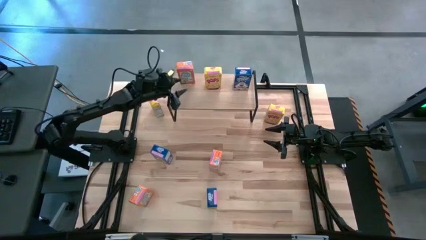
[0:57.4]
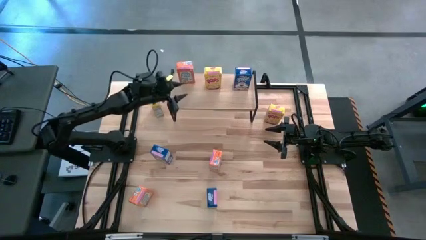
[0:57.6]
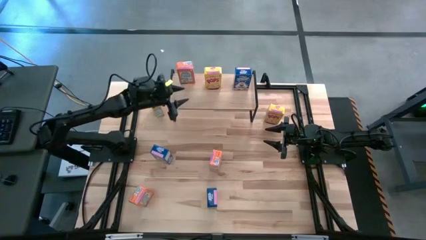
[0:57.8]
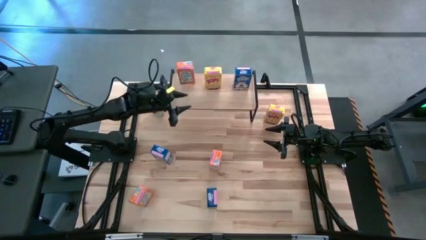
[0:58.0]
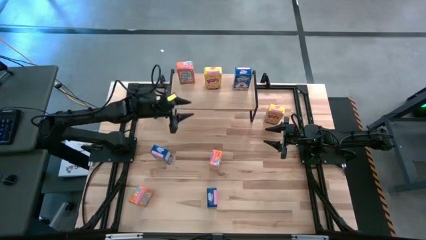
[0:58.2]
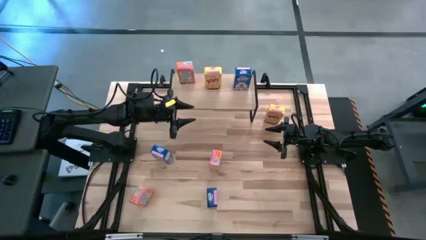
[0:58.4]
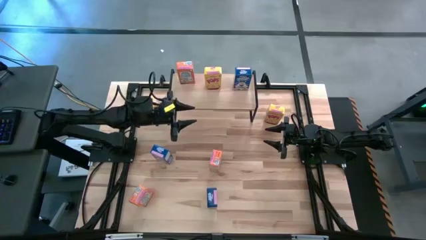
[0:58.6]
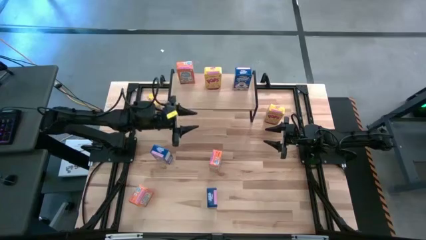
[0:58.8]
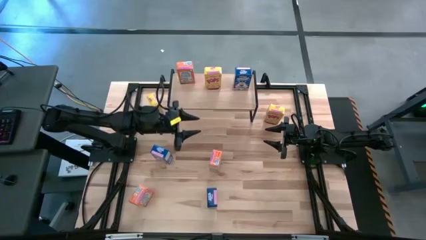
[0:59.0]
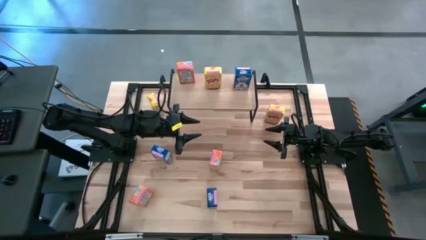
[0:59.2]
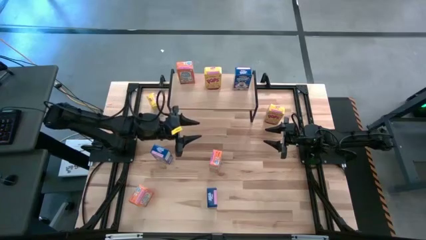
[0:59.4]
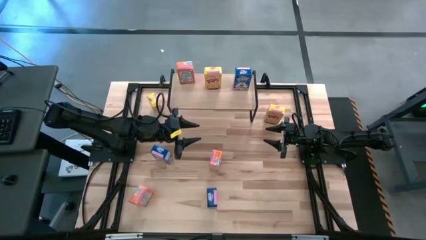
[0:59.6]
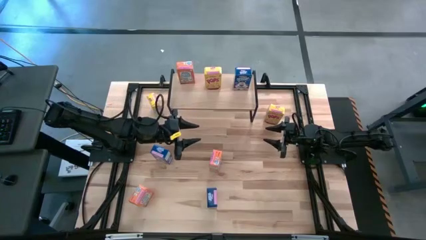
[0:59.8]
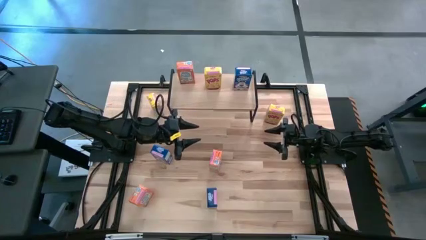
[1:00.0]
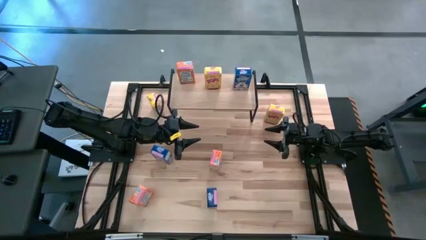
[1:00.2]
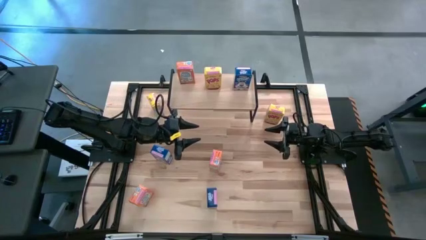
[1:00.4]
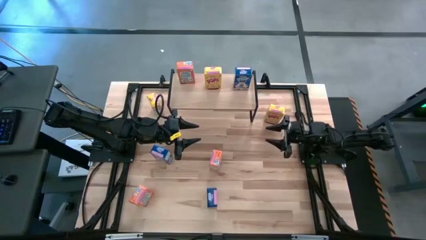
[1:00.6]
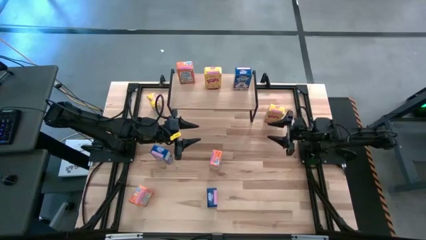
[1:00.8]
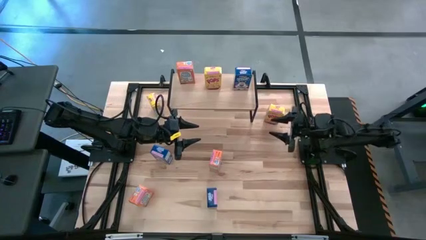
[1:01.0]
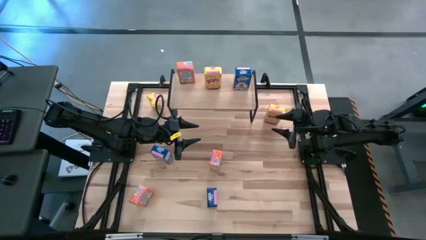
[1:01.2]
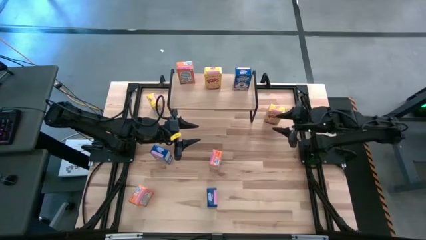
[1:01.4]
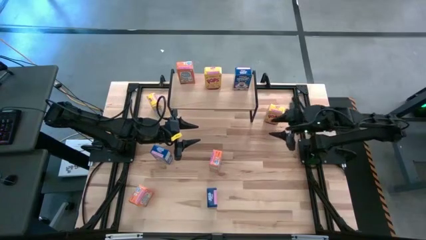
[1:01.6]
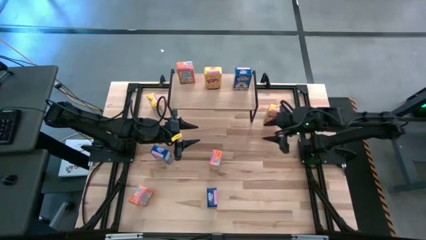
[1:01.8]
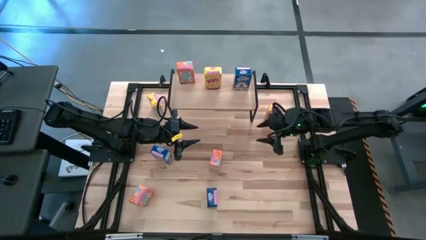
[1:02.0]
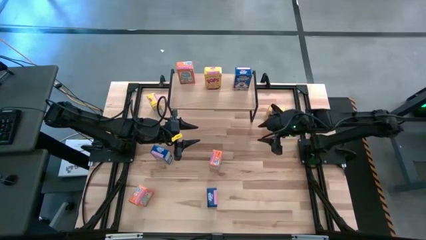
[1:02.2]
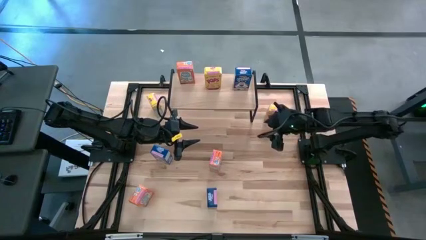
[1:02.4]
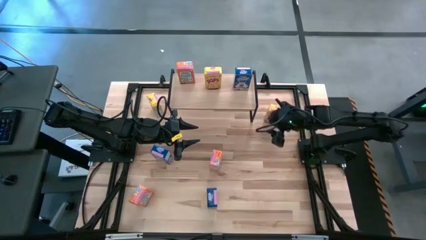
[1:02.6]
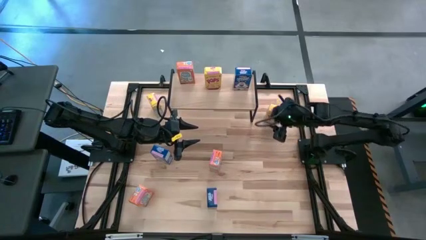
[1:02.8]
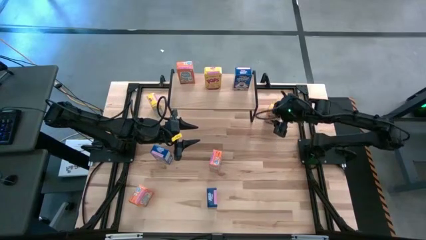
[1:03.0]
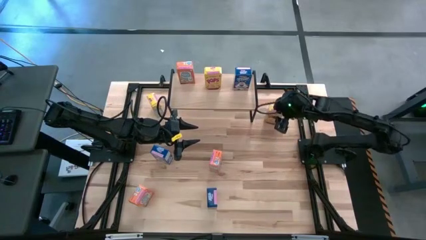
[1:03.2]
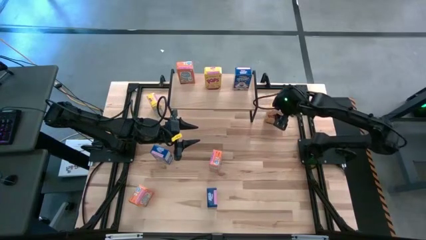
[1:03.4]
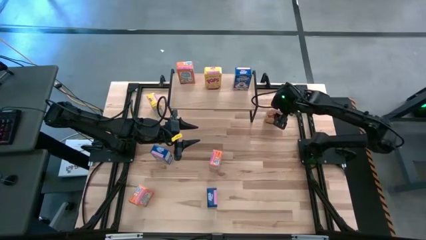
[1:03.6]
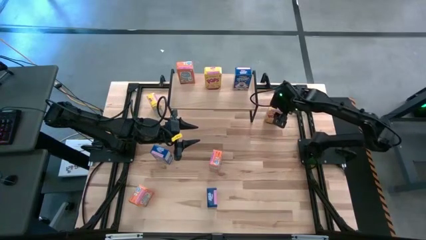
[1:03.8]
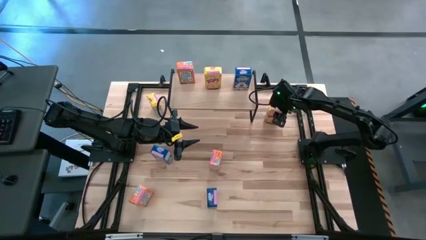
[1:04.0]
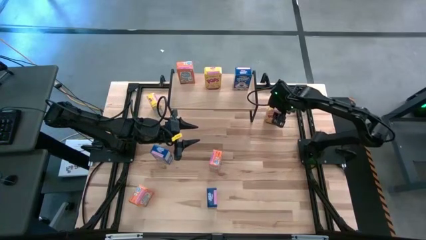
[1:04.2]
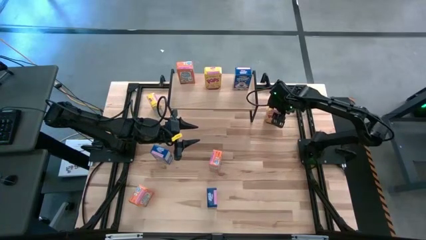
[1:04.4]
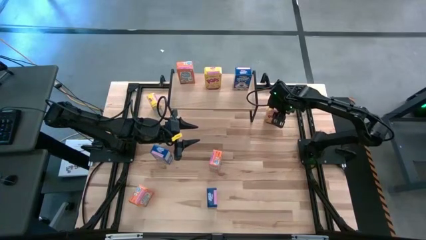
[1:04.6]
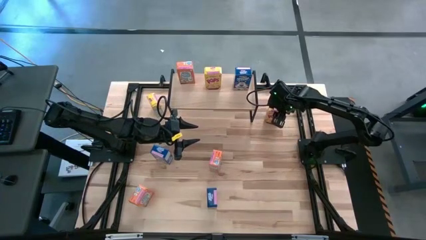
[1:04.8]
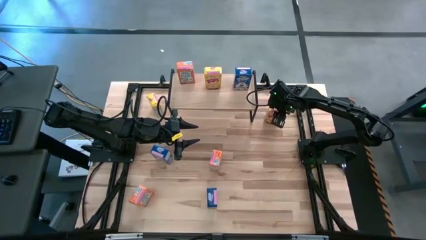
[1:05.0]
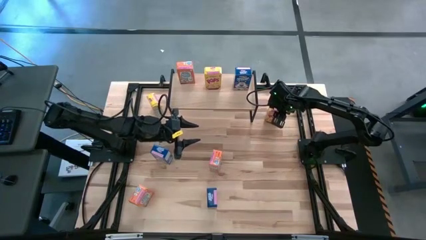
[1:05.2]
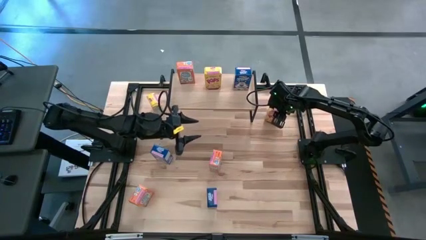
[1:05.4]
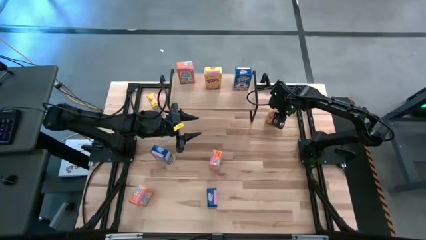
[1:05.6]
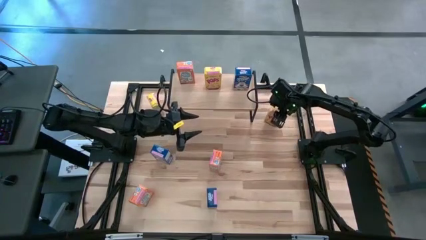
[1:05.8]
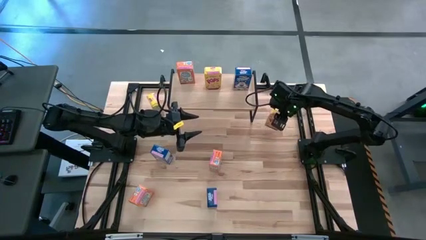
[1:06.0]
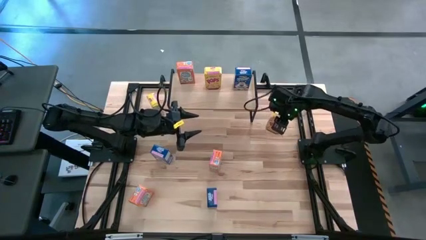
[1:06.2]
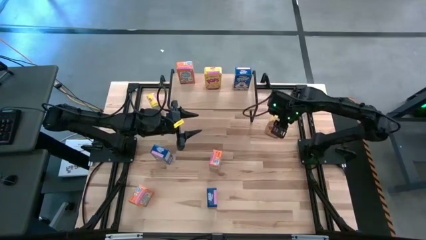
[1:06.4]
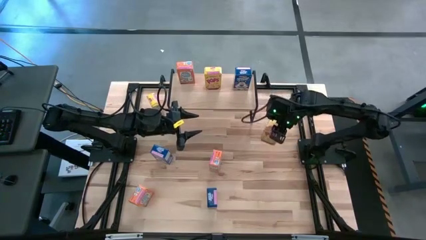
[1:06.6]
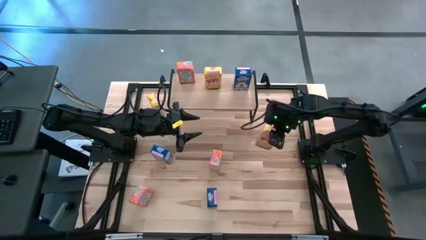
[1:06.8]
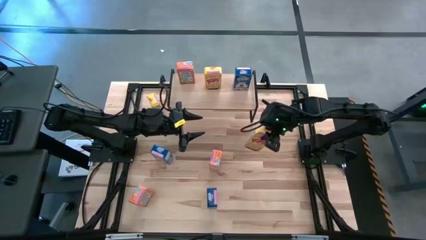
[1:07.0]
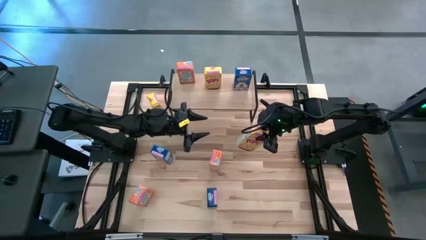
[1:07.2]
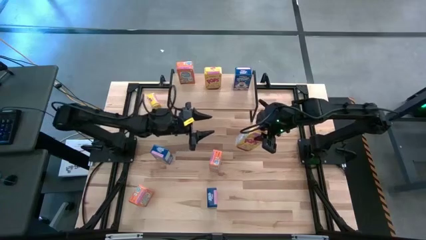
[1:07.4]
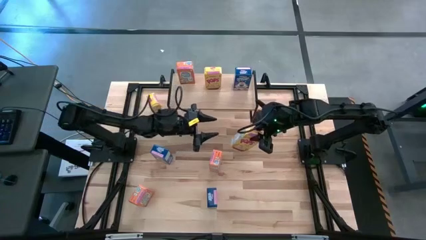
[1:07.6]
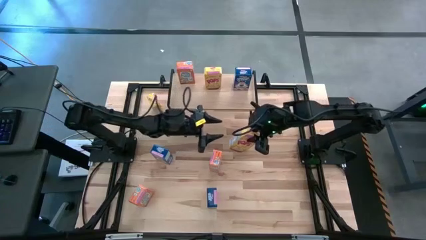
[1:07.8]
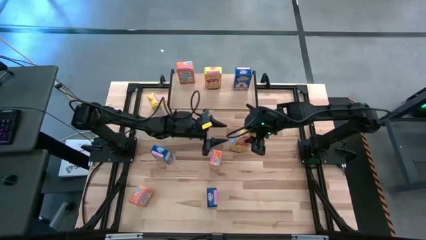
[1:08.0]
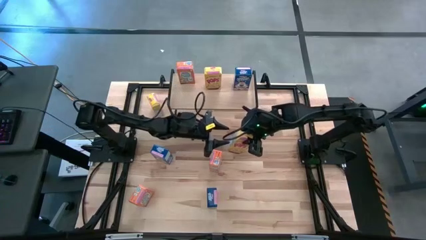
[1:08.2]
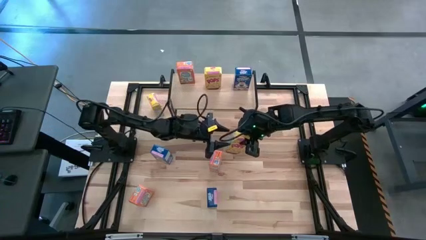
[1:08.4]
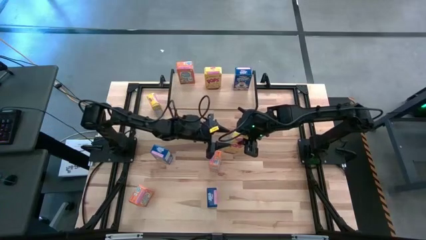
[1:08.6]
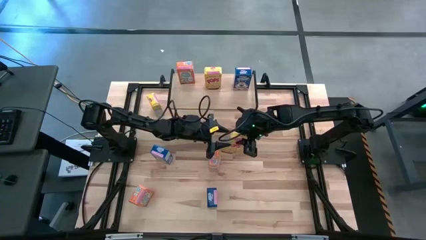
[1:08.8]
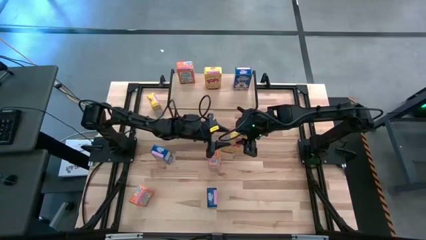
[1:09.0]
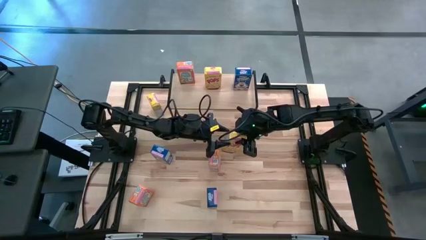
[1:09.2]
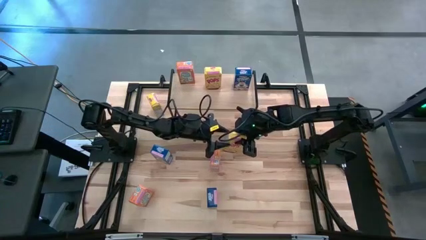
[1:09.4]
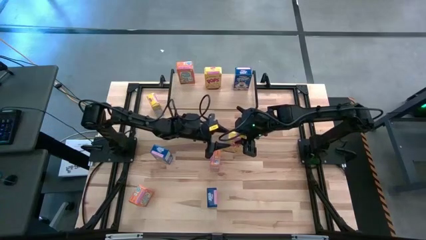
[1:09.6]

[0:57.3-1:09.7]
Task: Stack cereal on shelf
Put the right yellow cereal box on the shelf aligned with the other yellow cereal box
